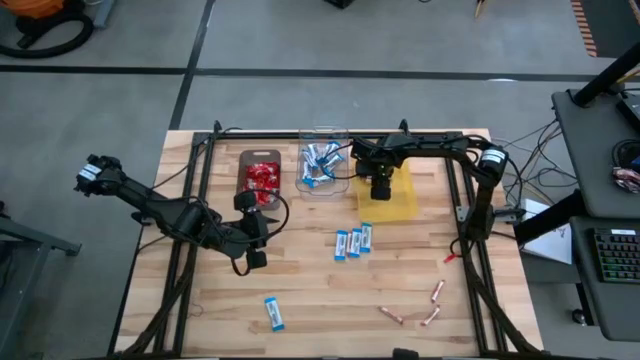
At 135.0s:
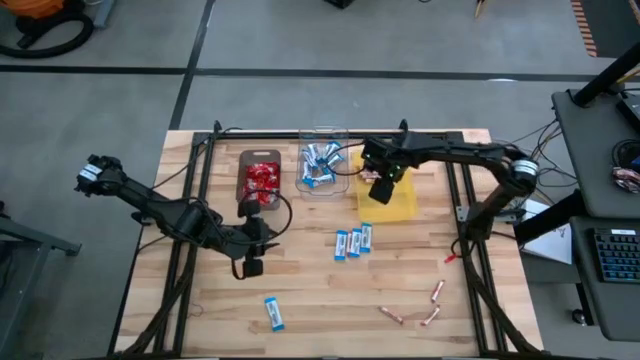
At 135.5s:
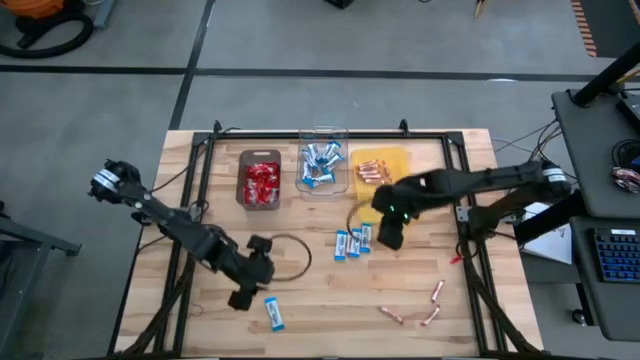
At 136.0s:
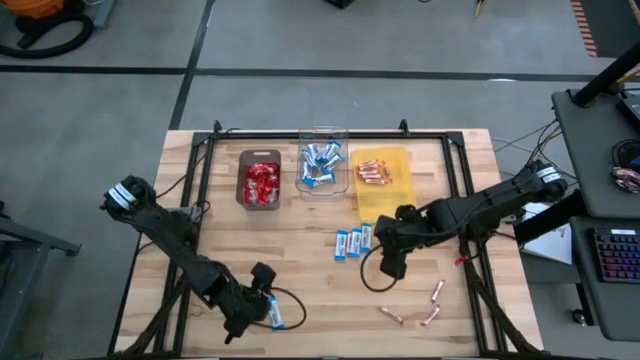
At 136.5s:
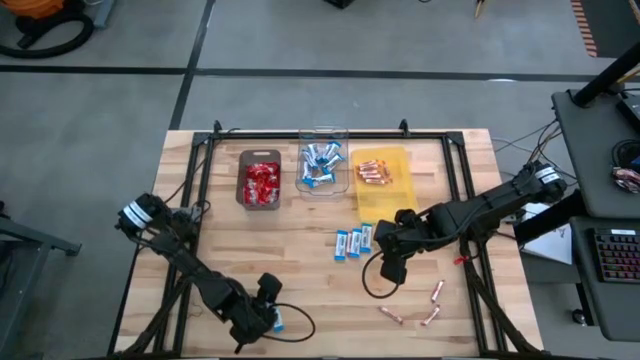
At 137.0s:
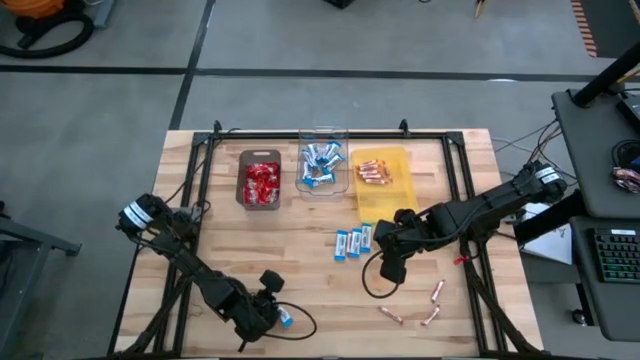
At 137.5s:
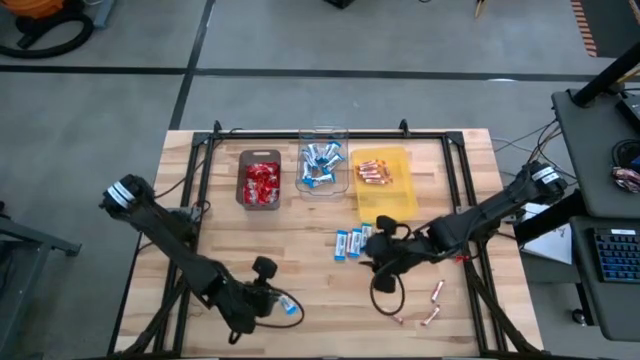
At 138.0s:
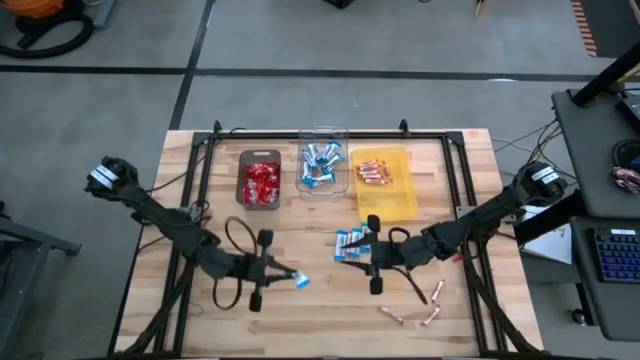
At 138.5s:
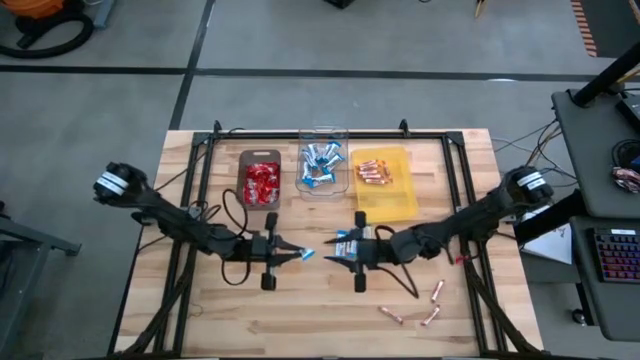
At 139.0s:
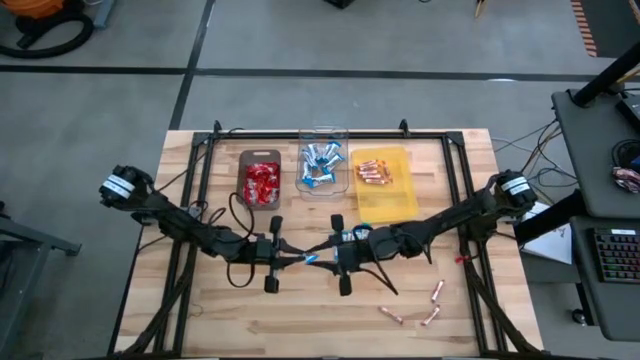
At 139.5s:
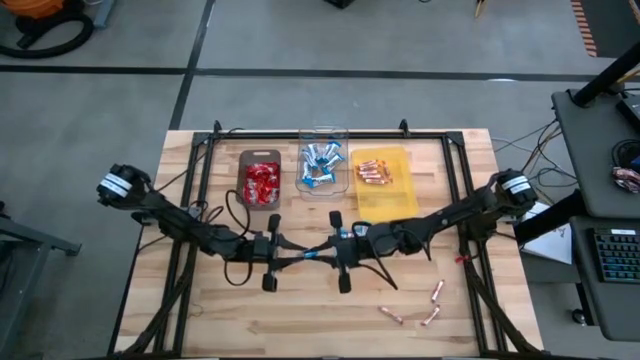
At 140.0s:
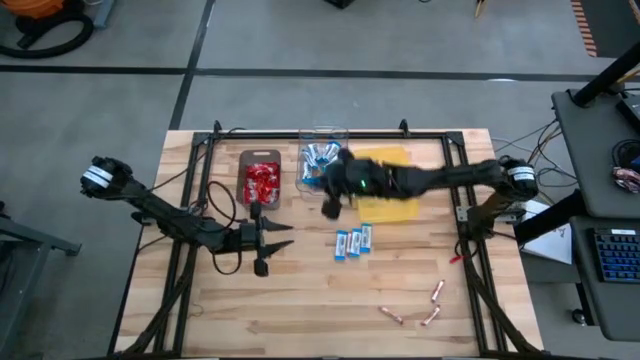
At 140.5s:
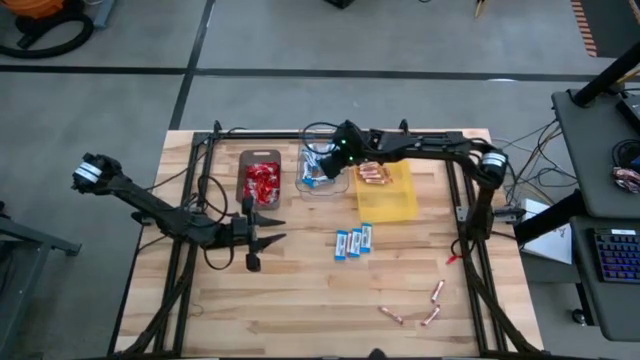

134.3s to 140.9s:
Task: Sort candy
Put the white chocolate into the transparent bin

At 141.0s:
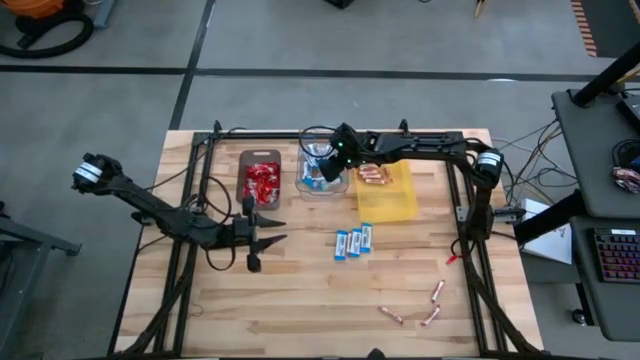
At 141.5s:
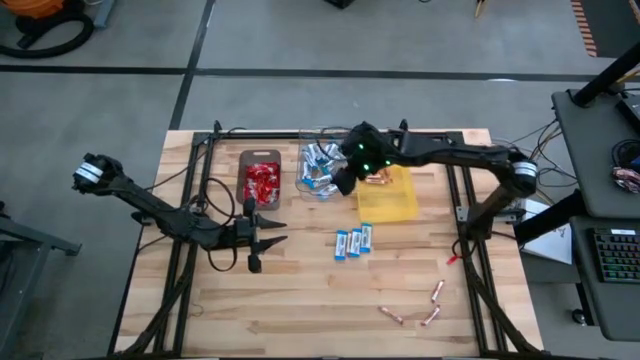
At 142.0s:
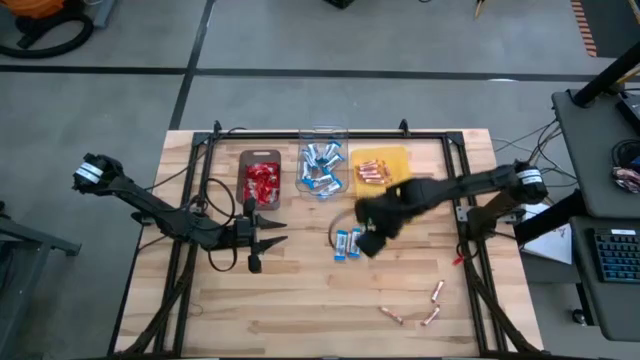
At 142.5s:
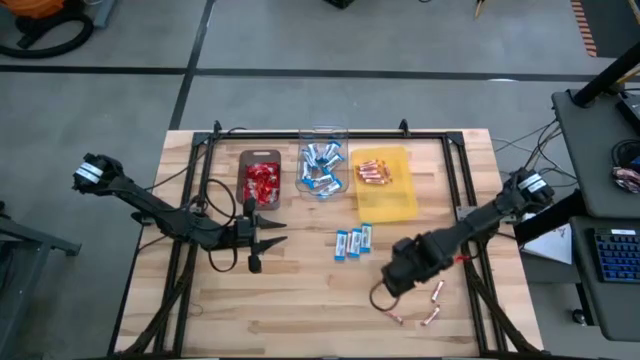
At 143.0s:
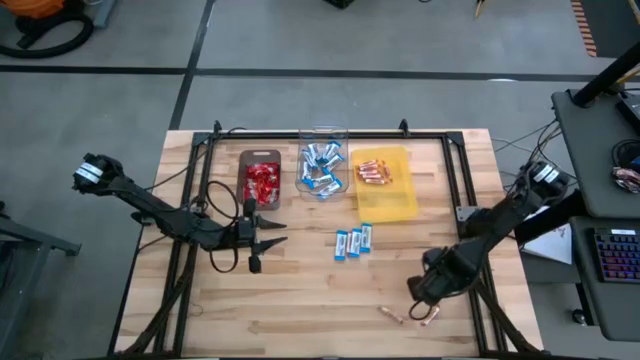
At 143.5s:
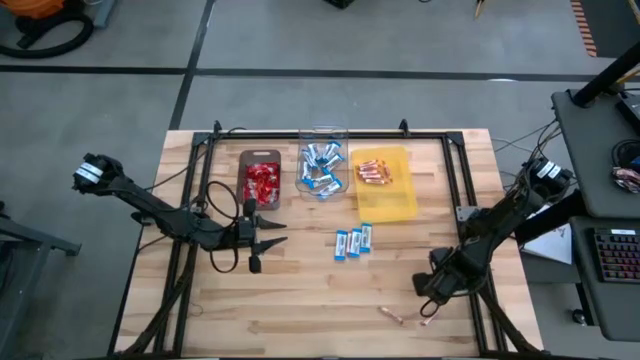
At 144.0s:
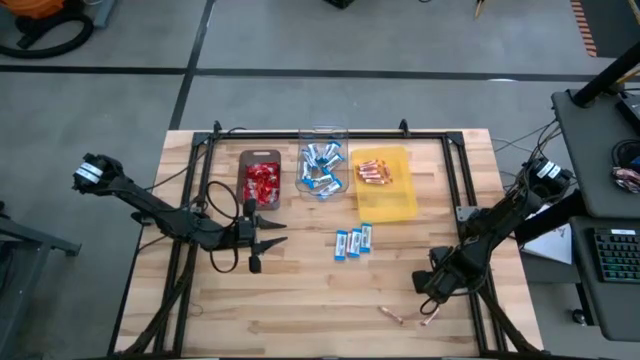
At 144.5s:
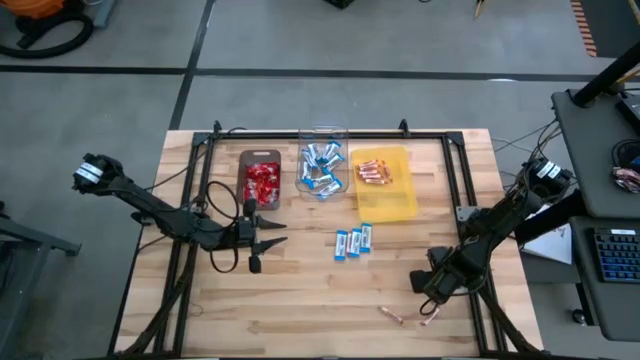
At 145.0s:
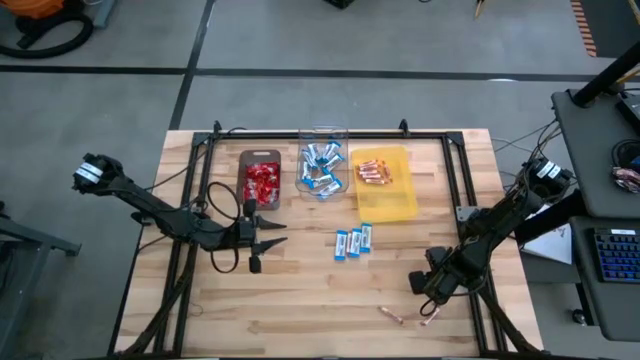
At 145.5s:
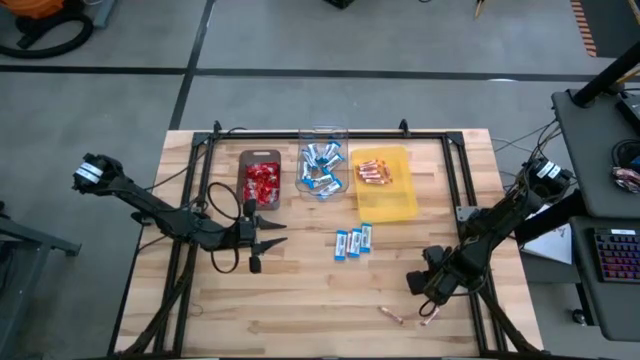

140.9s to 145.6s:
Put the white-red candy into the yellow bin

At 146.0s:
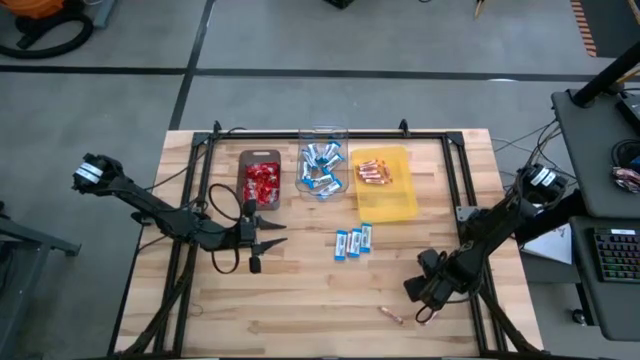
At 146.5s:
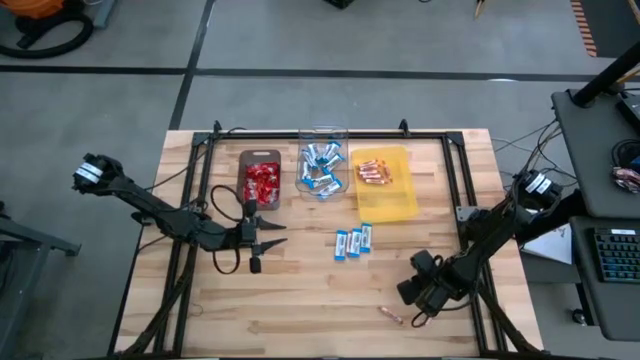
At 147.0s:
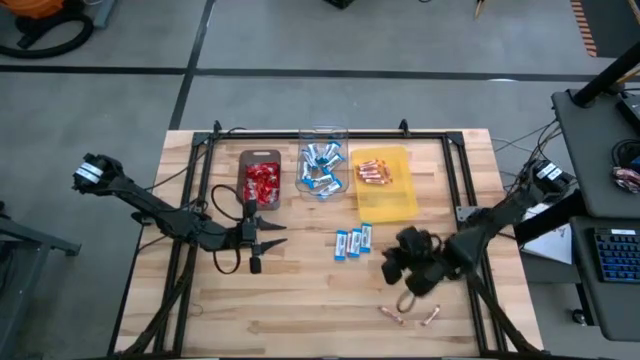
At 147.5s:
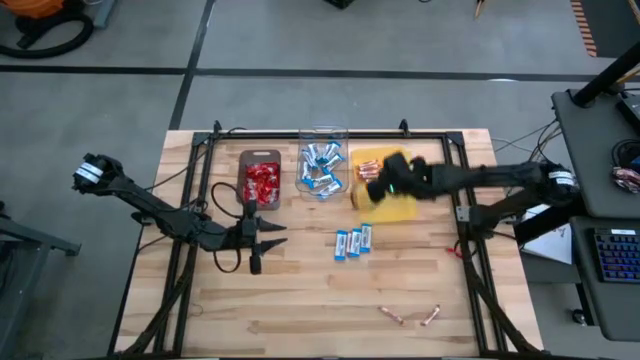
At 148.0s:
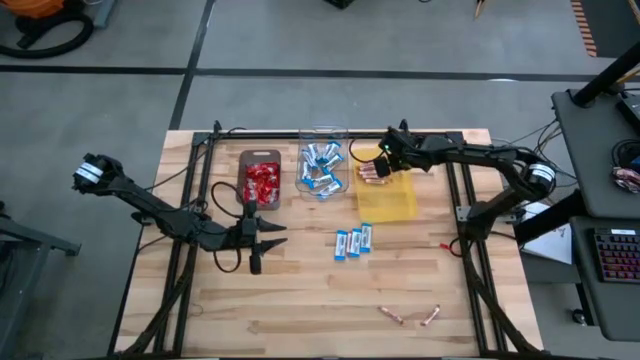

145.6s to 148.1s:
Put the white-red candy into the yellow bin

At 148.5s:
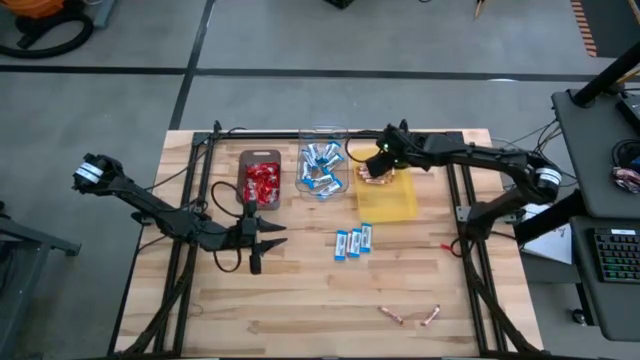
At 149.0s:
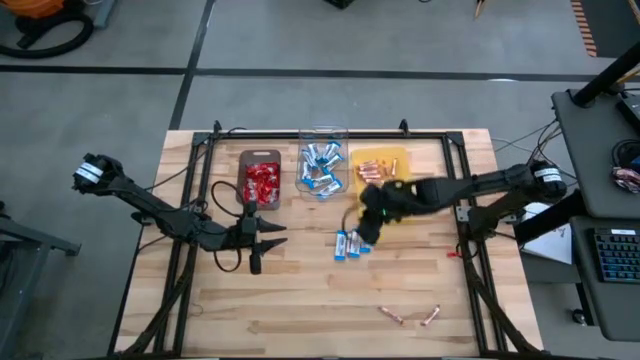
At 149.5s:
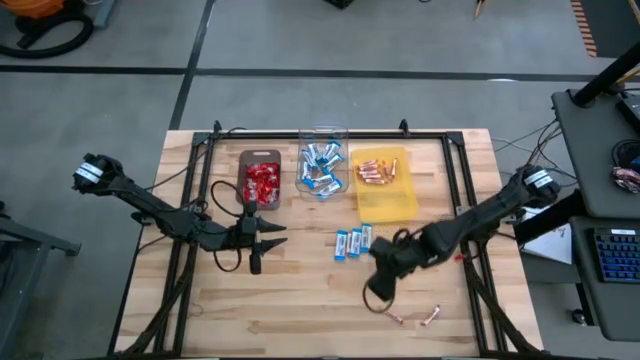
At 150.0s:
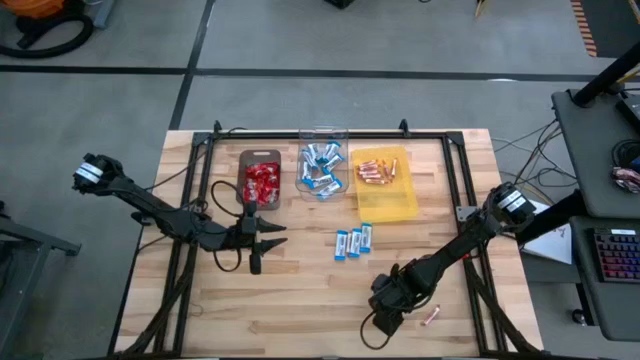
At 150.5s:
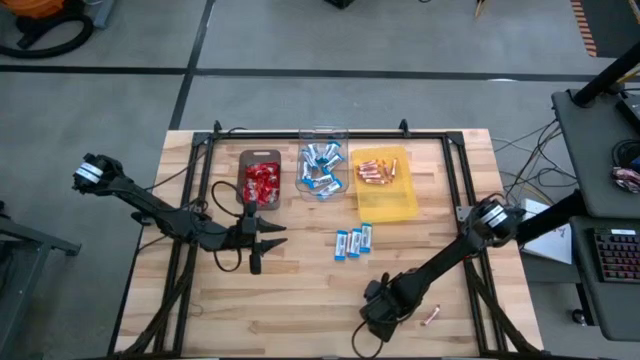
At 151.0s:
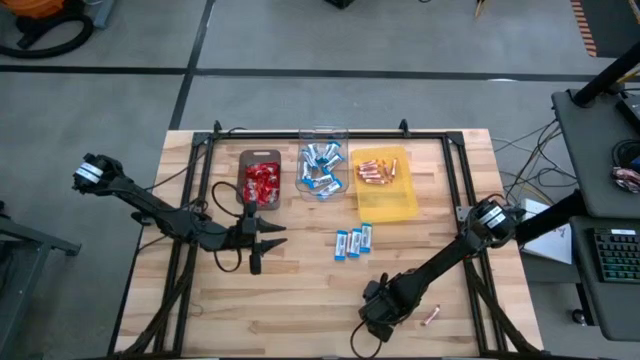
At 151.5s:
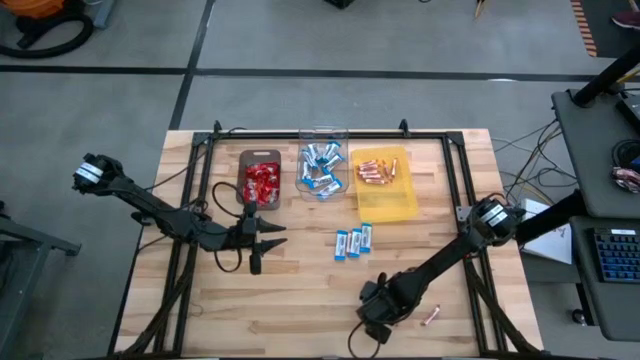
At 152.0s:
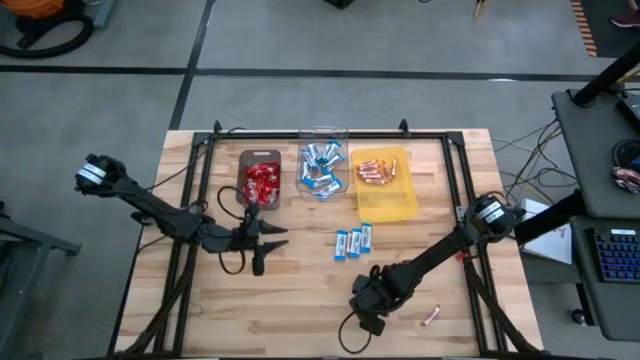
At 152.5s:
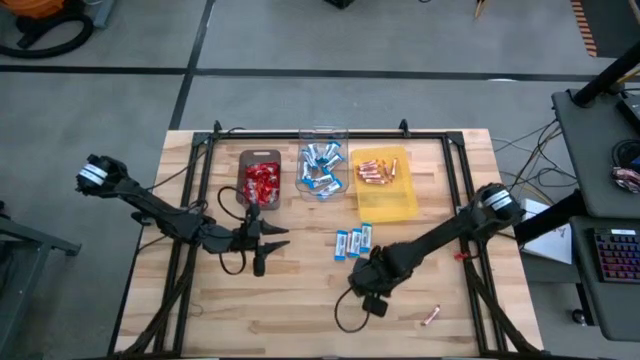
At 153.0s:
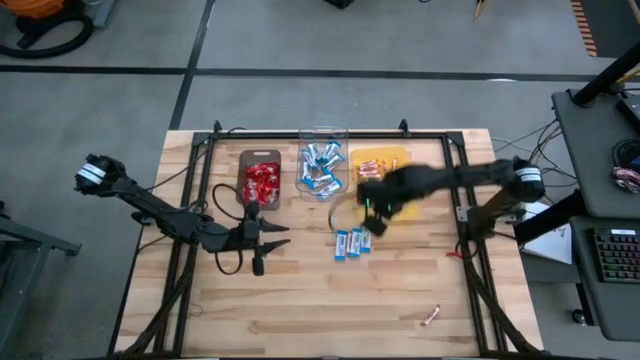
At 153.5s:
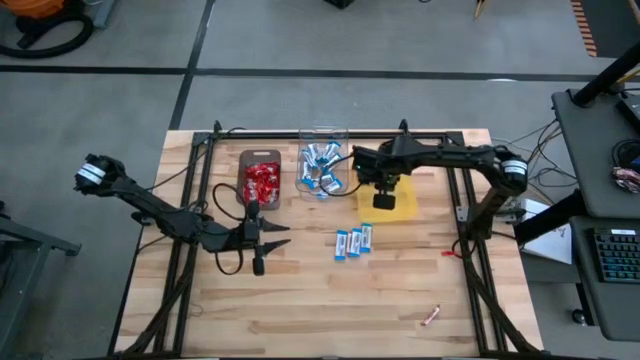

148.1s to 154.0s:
Put the white-red candy into the yellow bin

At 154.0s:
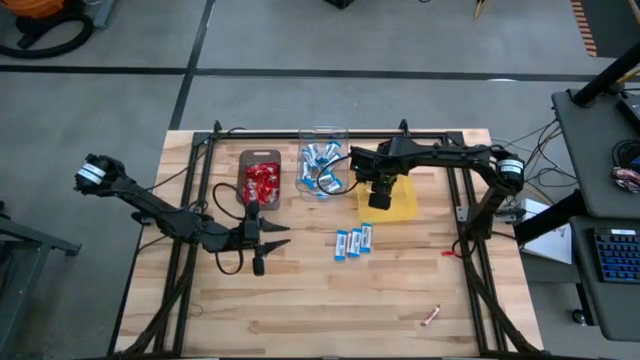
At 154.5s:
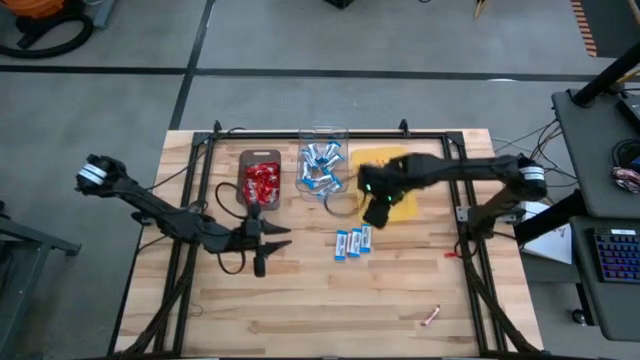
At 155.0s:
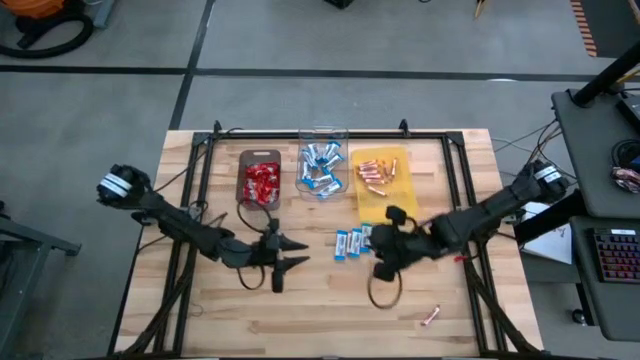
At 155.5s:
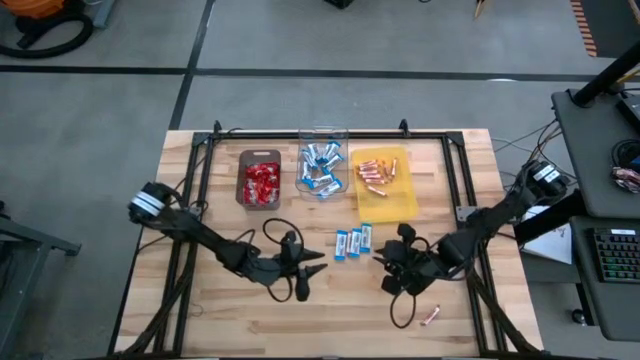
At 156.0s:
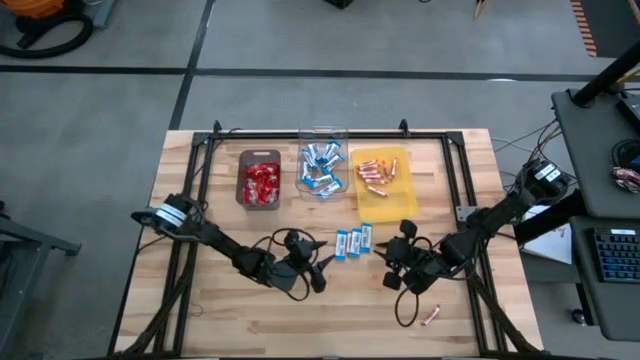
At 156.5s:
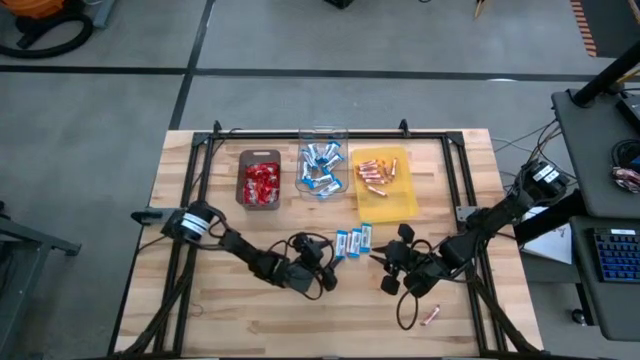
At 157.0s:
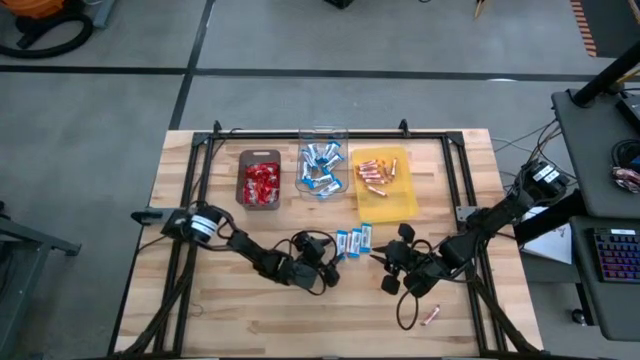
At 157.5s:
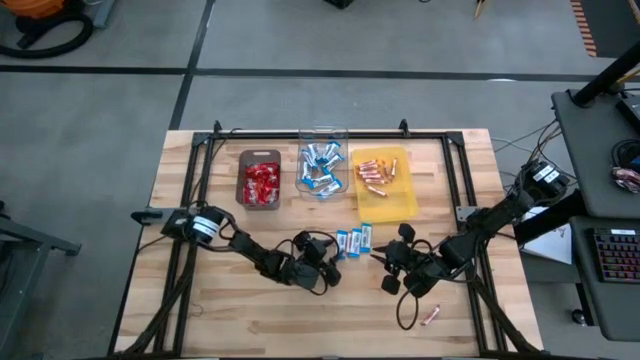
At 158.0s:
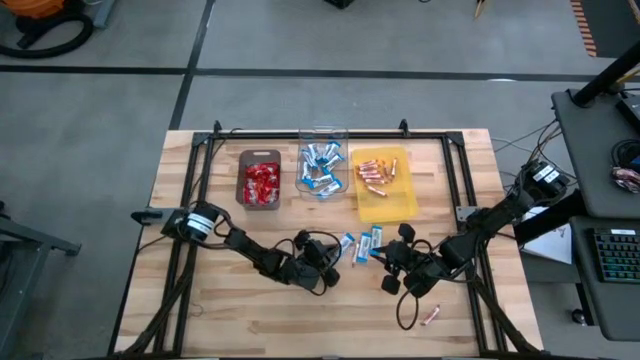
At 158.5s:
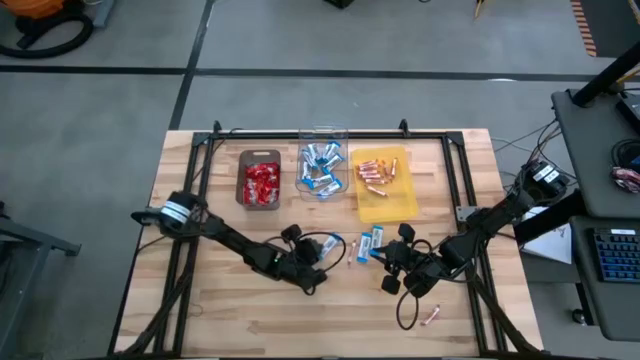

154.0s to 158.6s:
Put the white chocolate into the transparent bin
